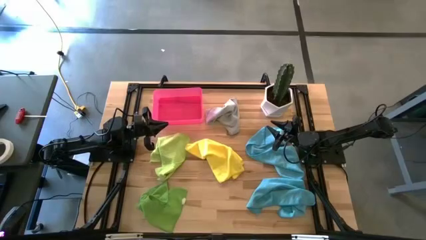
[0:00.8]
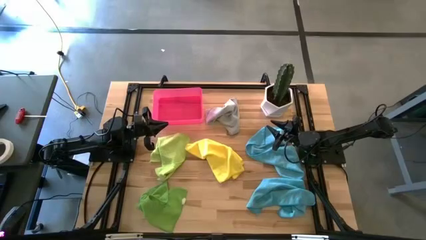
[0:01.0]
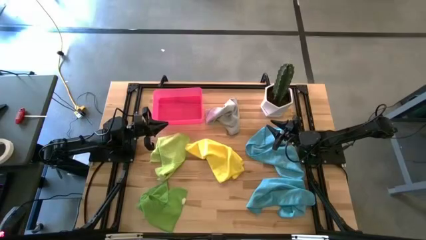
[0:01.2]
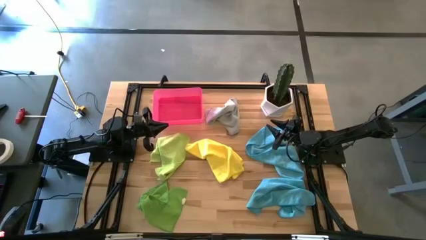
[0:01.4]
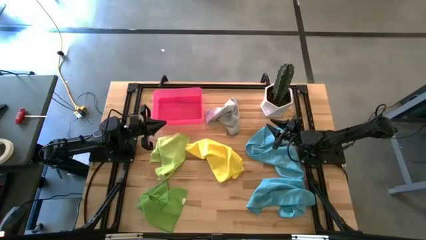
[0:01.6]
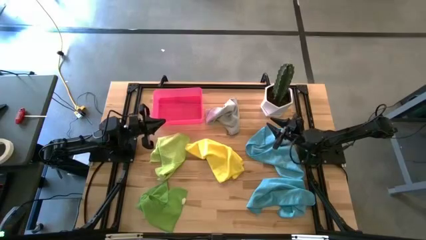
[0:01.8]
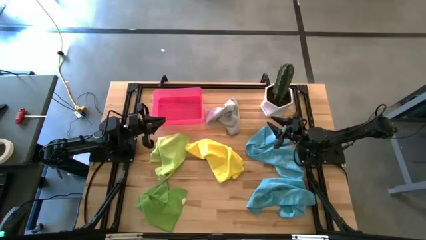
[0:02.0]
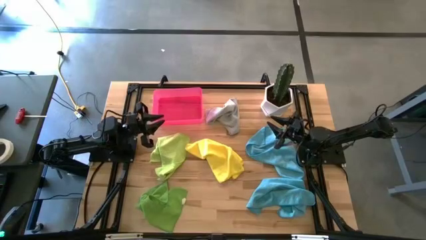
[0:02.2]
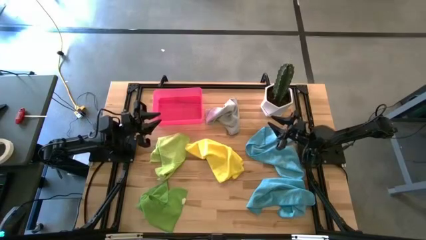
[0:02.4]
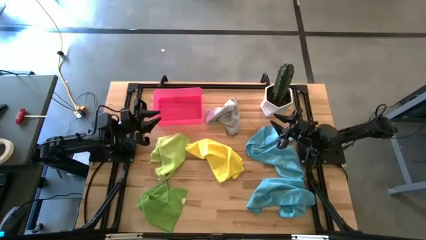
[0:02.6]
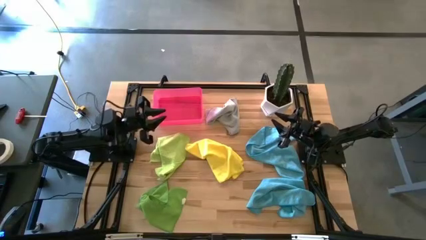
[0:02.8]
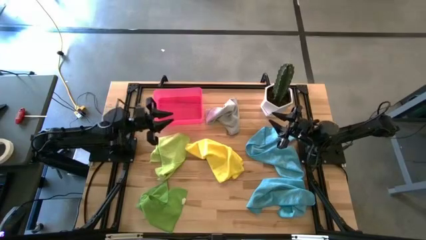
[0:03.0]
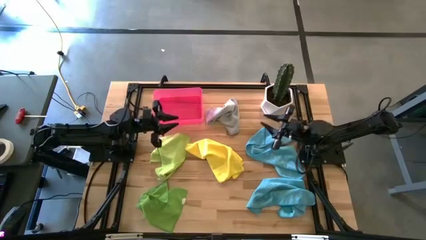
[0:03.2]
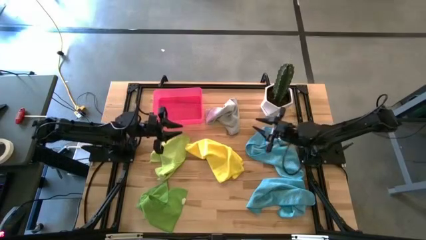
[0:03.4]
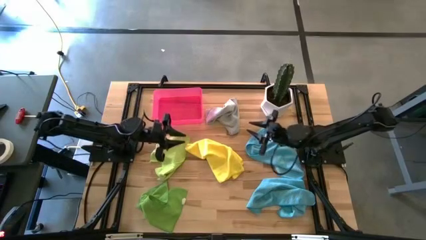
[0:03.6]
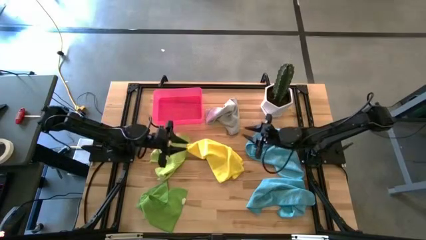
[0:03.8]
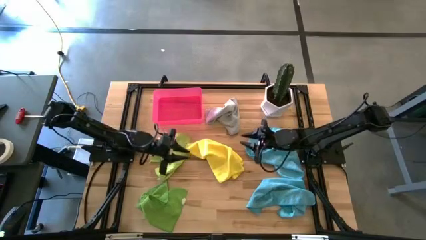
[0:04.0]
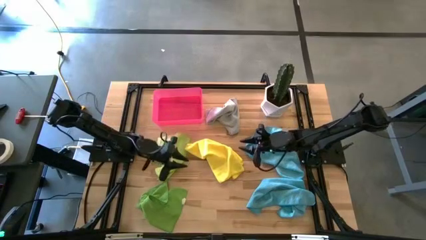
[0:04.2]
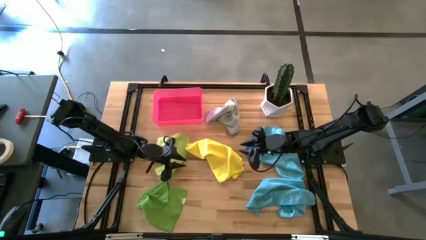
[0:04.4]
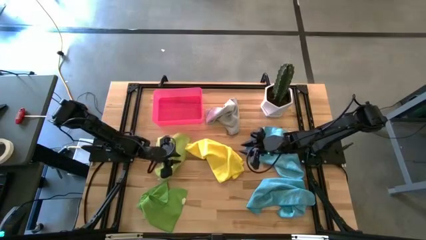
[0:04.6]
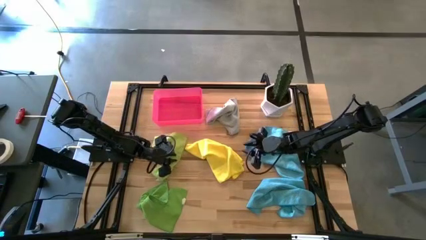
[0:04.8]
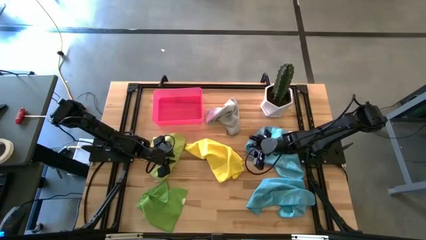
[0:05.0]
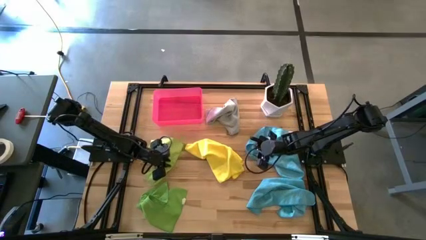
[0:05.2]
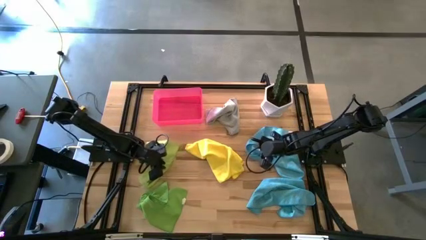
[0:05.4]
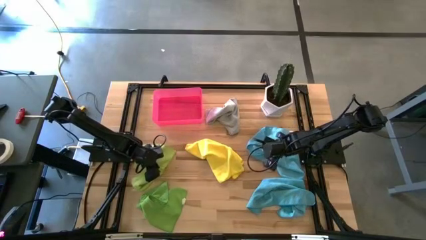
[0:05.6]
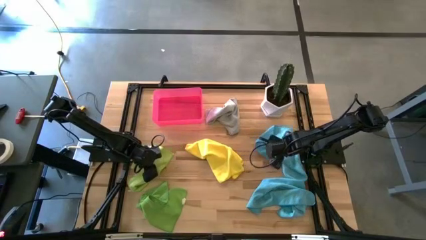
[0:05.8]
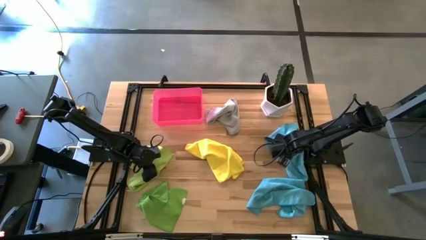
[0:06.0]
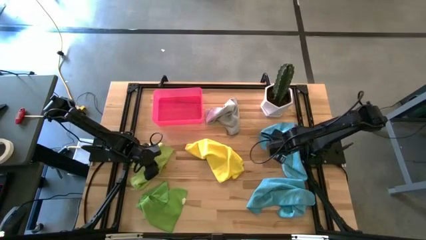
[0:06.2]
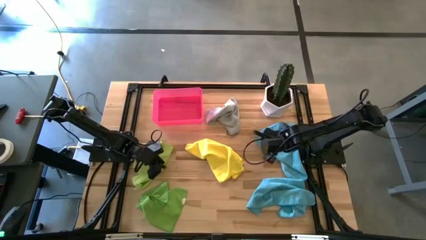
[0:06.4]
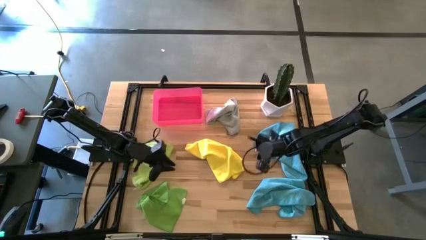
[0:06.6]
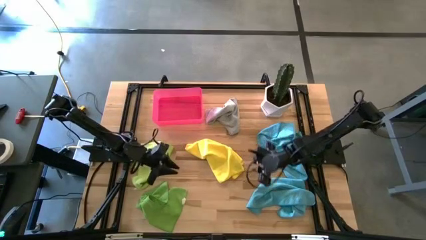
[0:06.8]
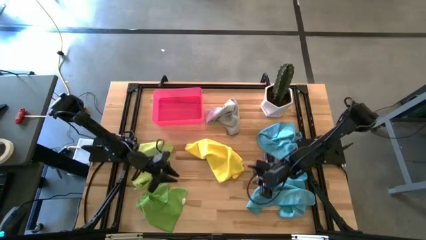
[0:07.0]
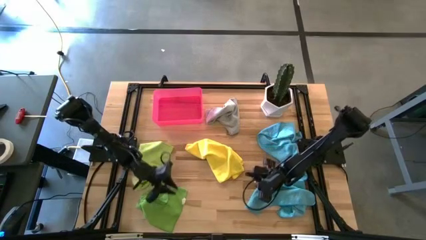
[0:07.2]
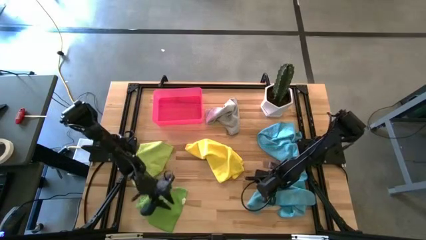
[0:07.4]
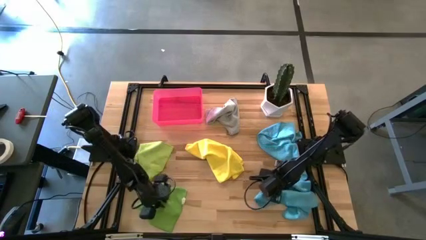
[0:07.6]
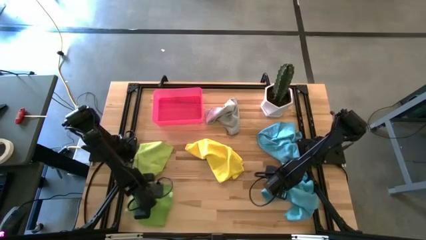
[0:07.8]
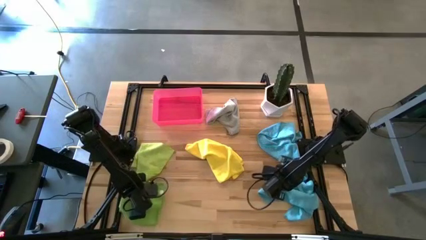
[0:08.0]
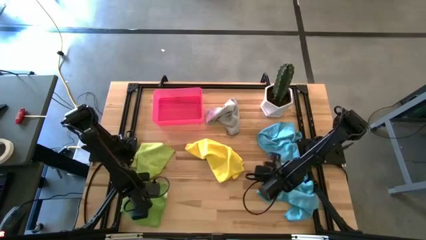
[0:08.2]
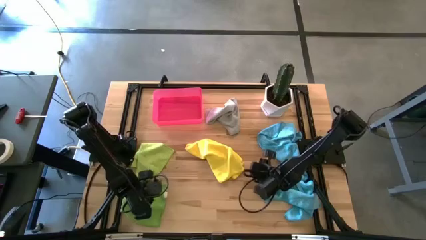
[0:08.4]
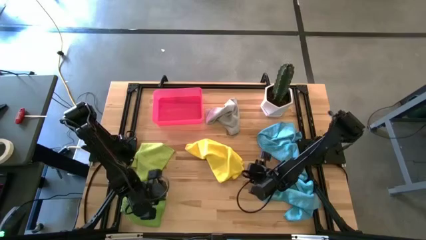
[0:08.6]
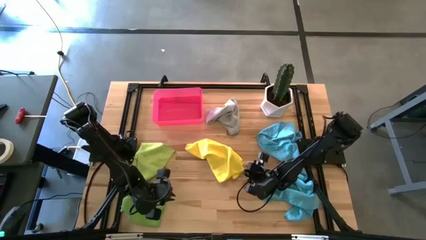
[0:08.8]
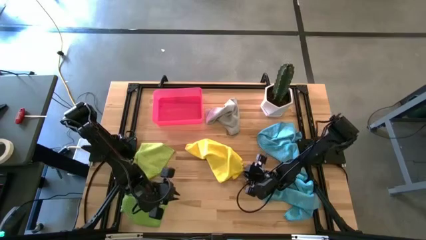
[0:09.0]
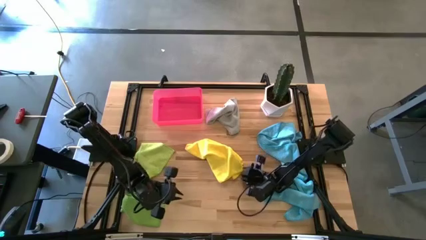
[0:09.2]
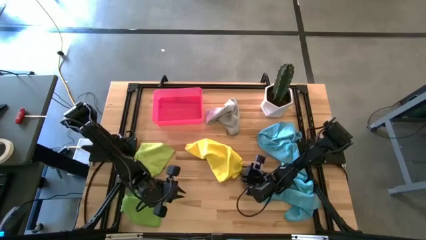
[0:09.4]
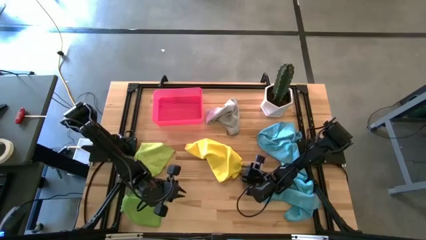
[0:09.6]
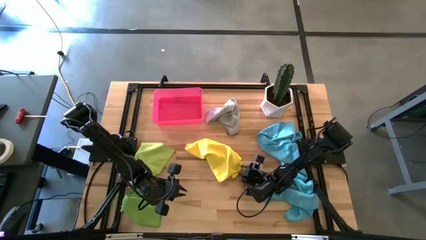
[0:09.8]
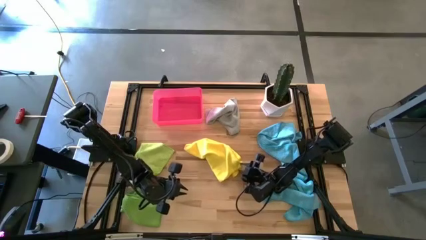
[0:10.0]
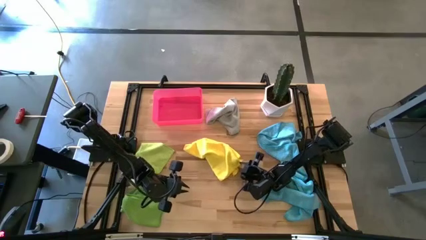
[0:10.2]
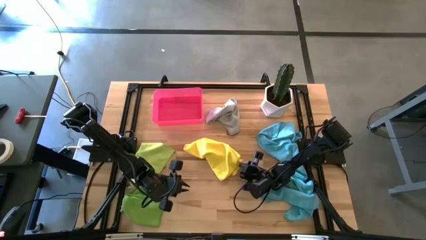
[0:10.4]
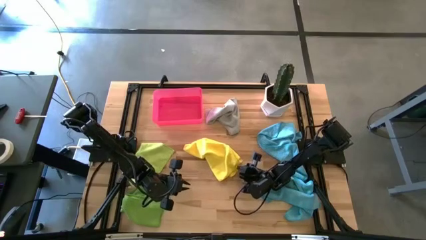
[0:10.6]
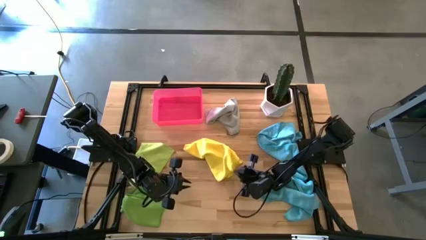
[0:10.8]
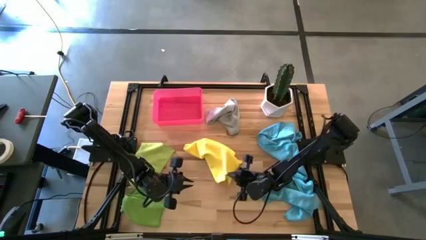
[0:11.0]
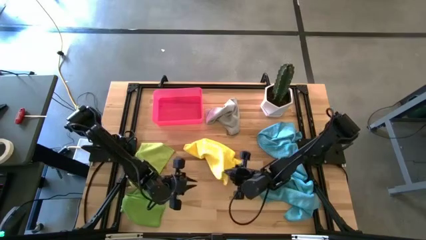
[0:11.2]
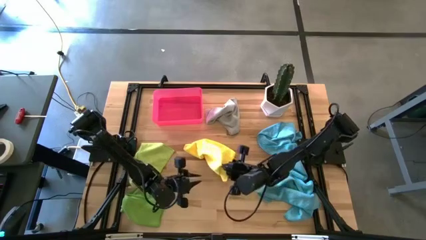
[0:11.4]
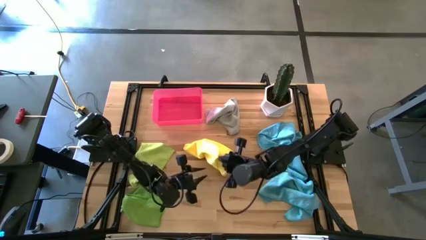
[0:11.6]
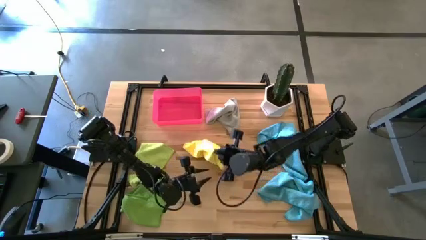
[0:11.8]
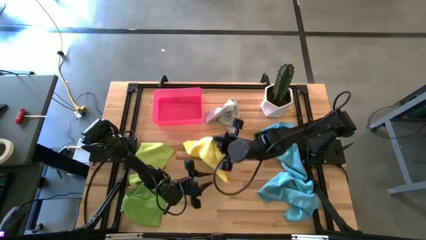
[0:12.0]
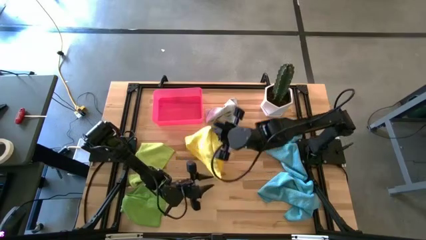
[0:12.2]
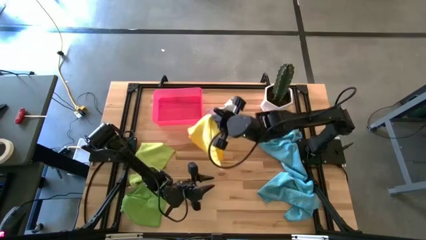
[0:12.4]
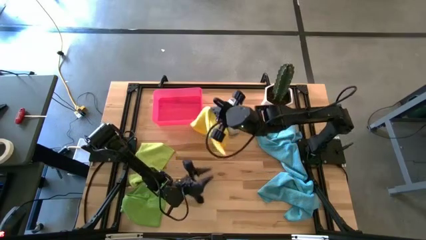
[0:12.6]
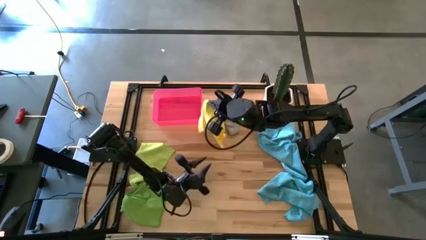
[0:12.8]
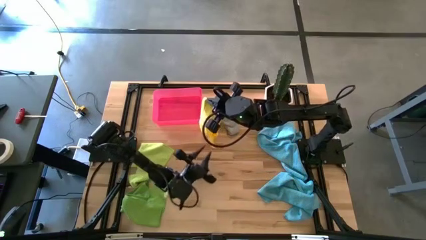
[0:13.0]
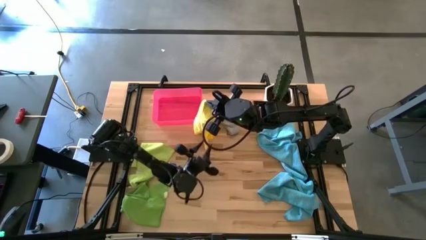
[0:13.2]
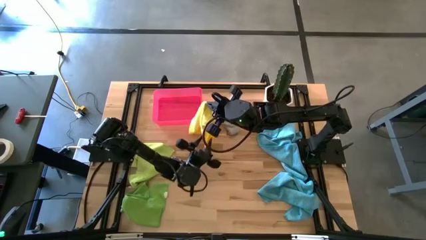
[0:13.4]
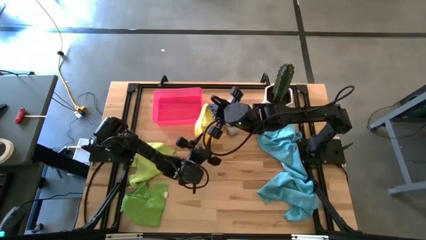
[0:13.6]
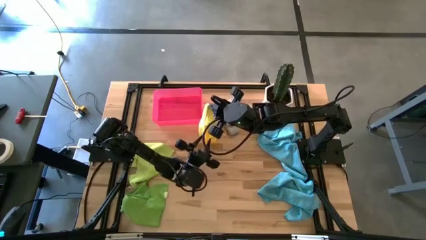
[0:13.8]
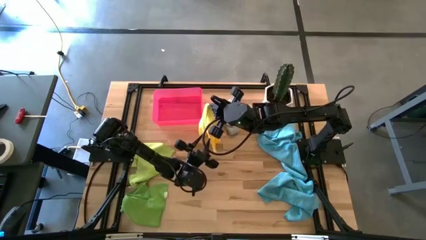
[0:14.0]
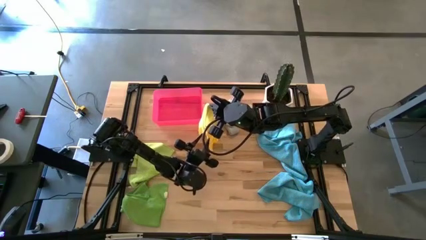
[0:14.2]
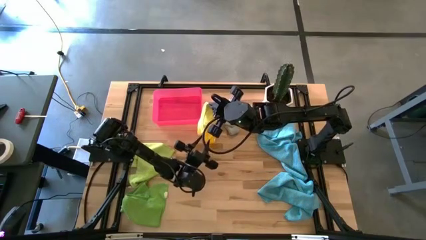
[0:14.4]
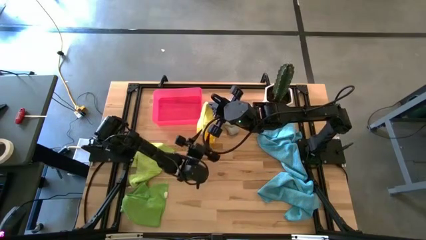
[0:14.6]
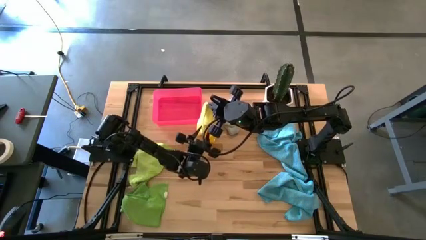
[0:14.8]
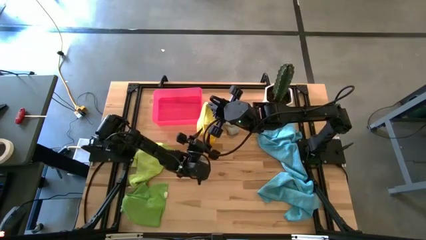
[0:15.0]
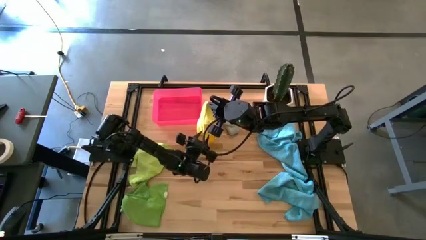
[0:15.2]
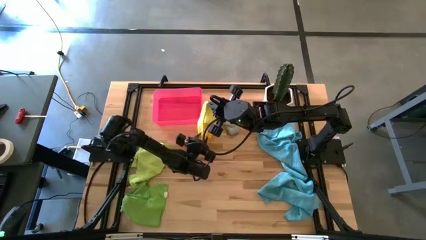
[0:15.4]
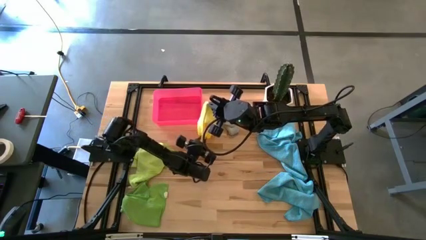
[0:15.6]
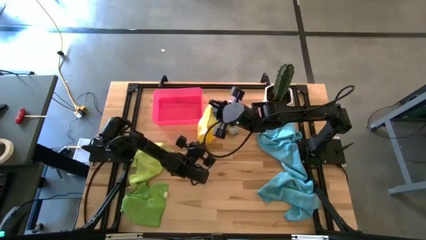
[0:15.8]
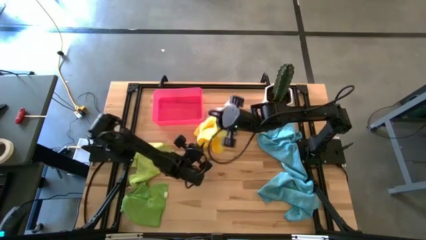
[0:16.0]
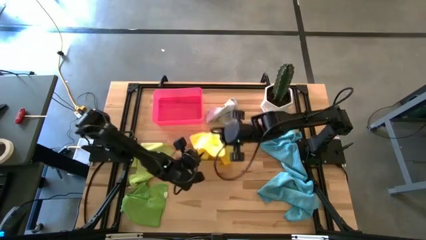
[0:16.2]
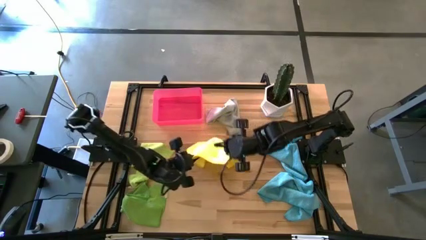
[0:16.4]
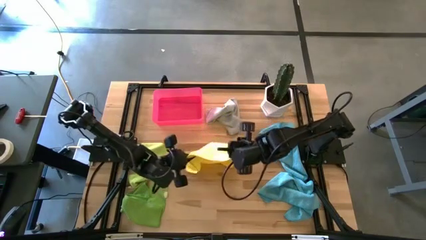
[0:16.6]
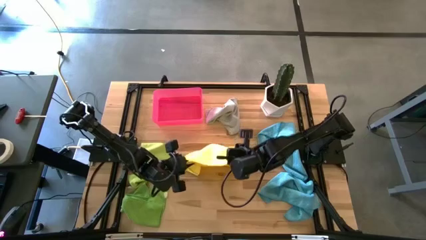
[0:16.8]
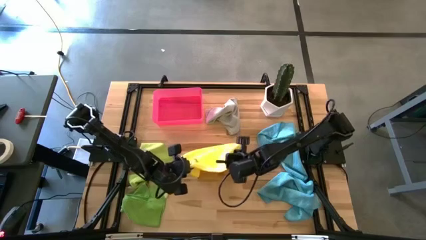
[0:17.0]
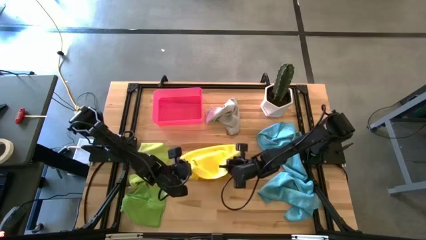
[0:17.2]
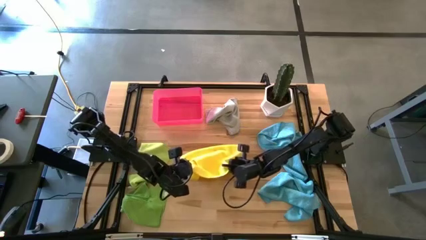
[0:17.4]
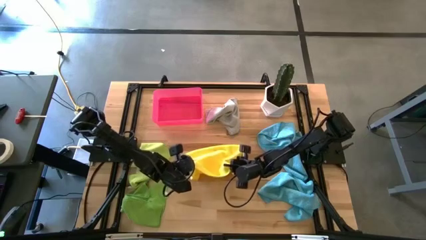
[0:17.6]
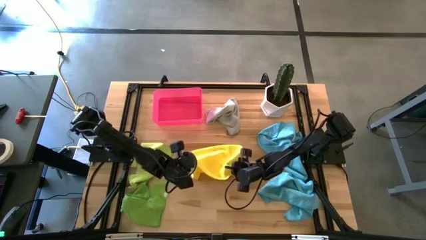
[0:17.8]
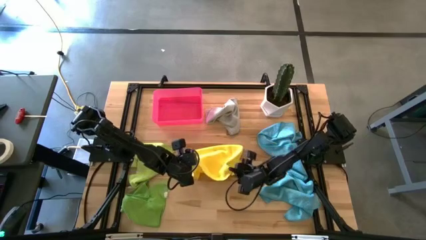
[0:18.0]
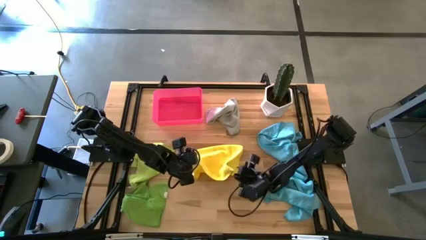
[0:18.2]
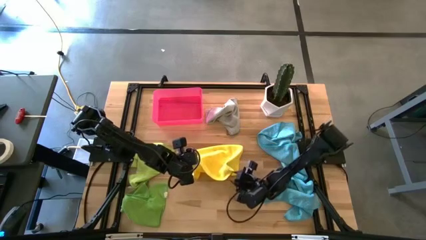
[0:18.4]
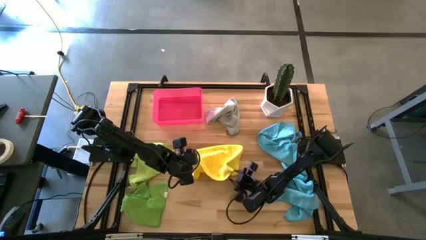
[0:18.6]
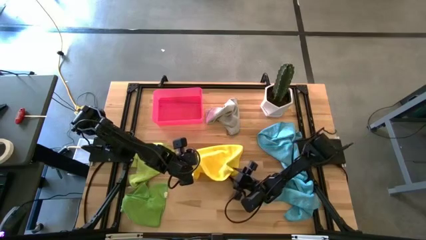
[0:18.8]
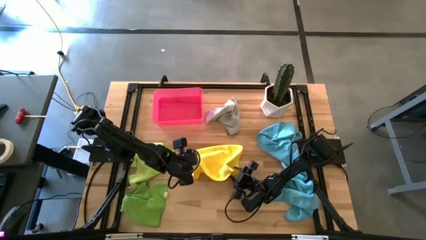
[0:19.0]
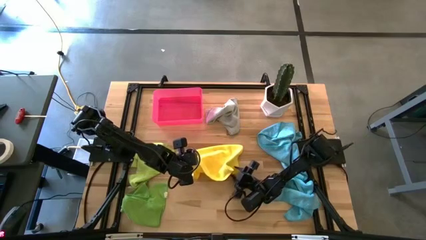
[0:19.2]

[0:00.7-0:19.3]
Task: Fold microfiber towels
Fold the yellow towel on the table
